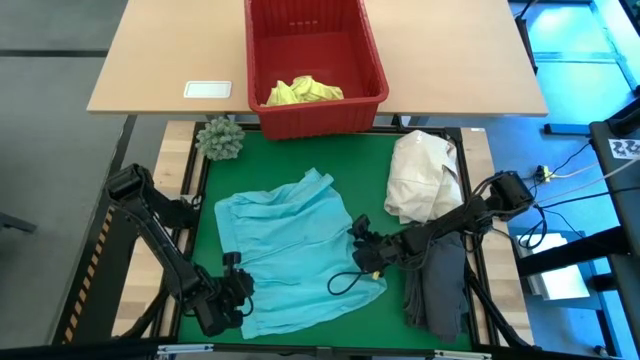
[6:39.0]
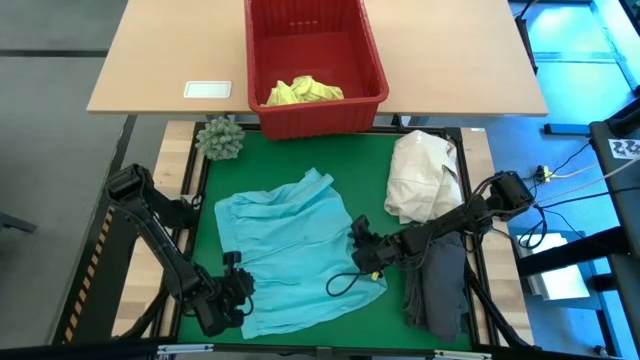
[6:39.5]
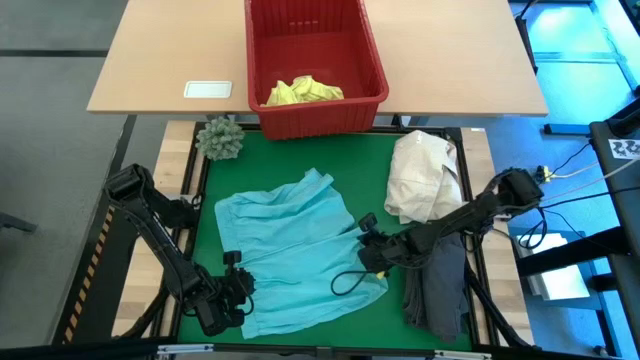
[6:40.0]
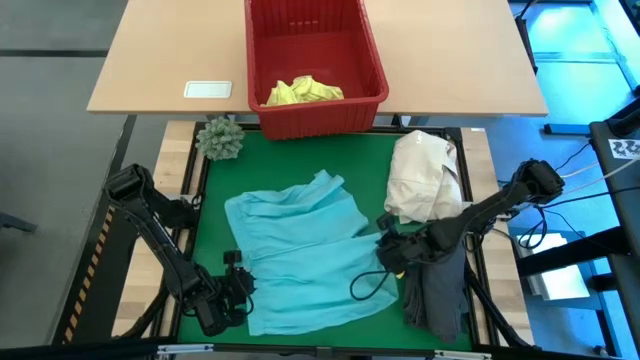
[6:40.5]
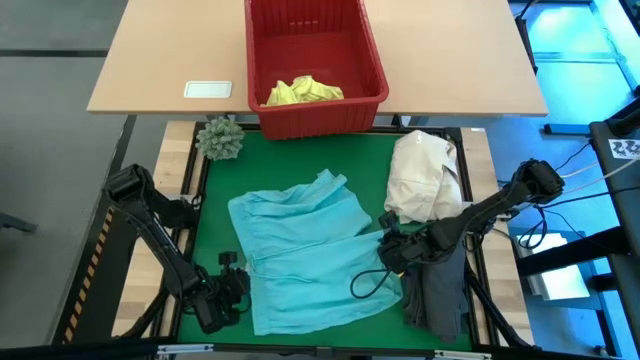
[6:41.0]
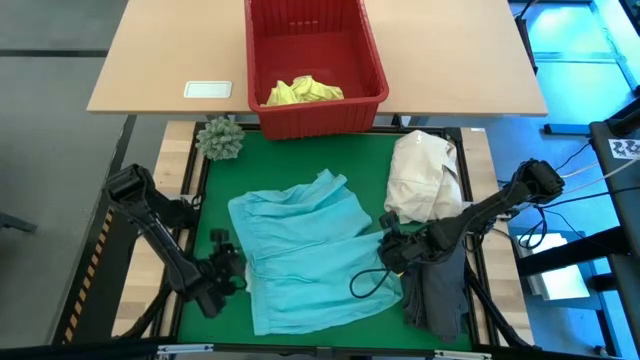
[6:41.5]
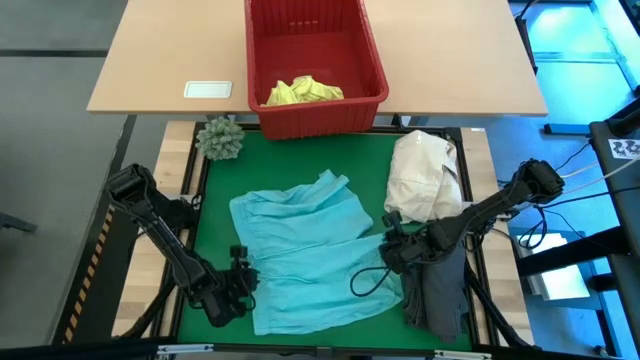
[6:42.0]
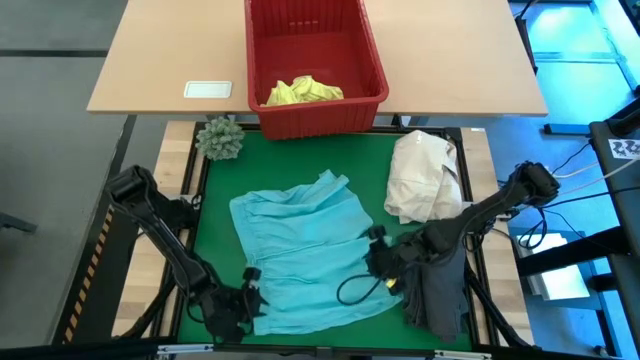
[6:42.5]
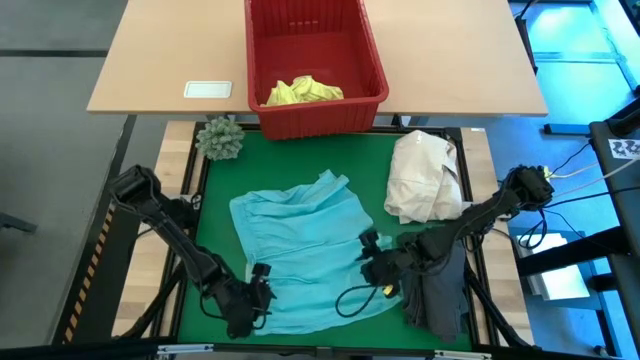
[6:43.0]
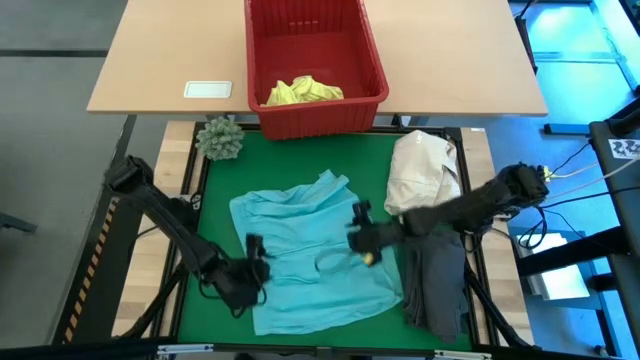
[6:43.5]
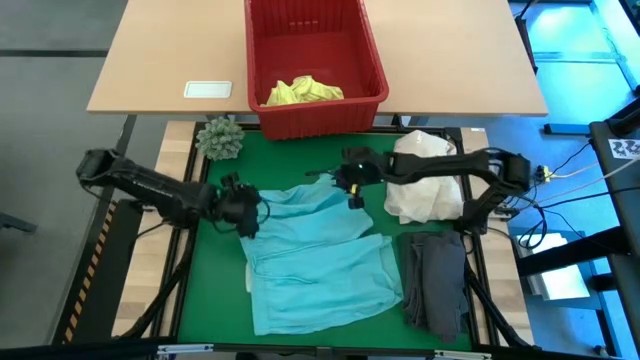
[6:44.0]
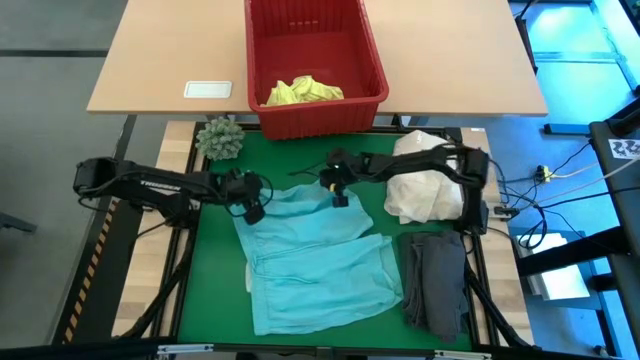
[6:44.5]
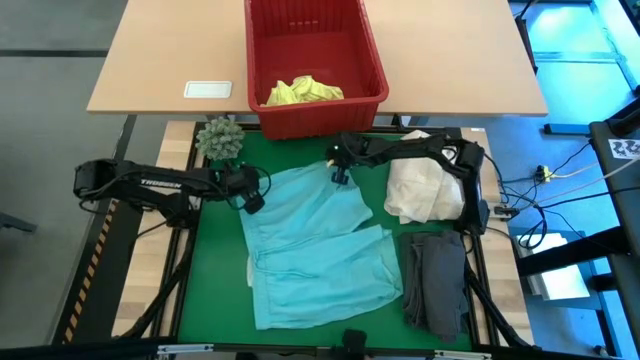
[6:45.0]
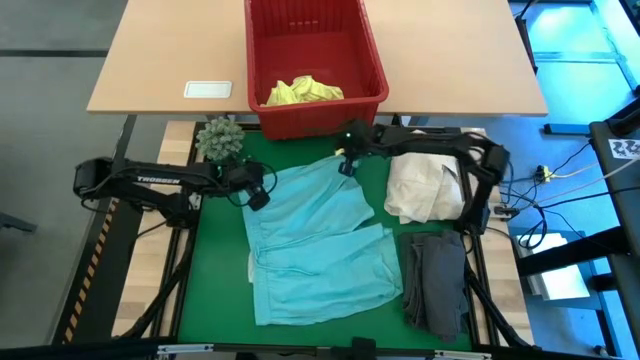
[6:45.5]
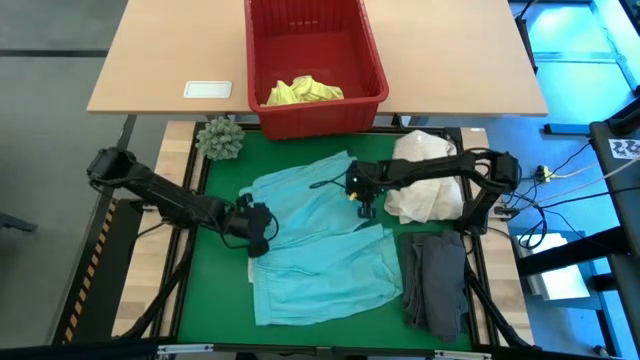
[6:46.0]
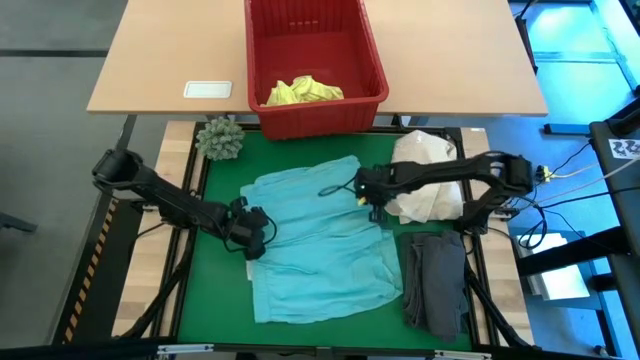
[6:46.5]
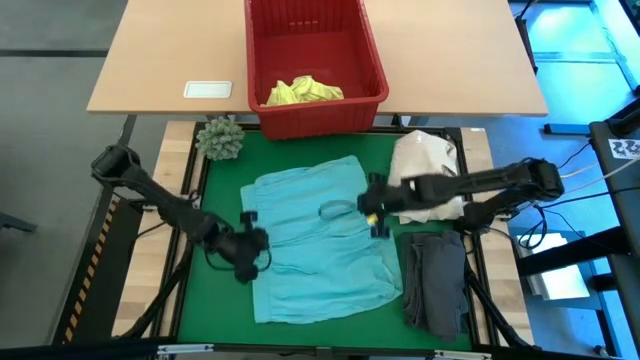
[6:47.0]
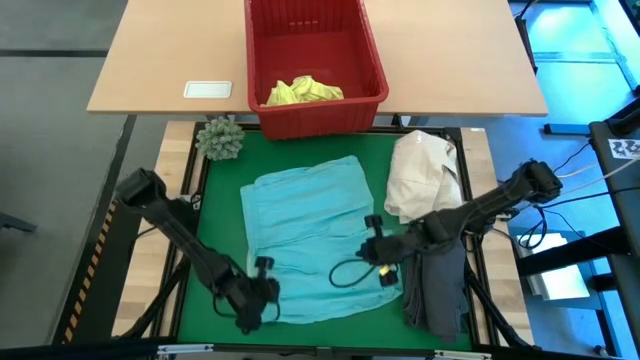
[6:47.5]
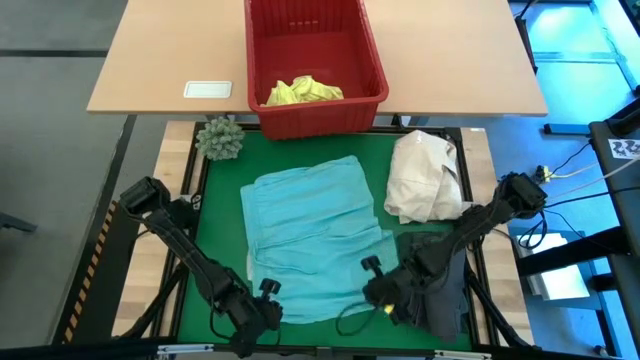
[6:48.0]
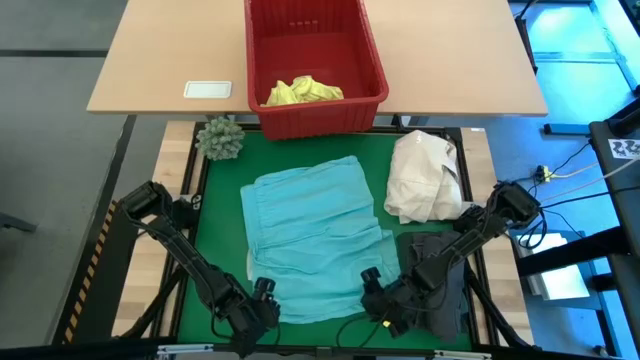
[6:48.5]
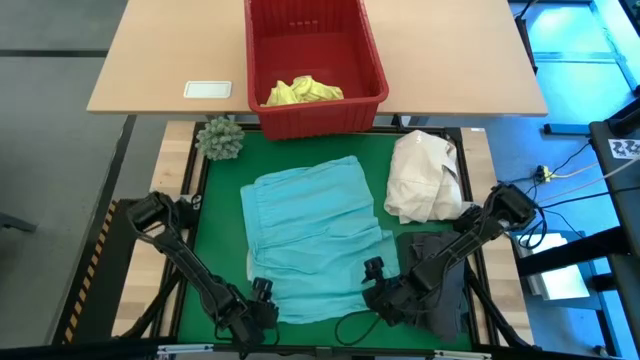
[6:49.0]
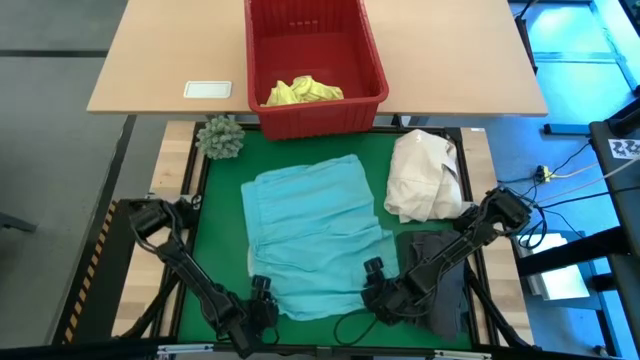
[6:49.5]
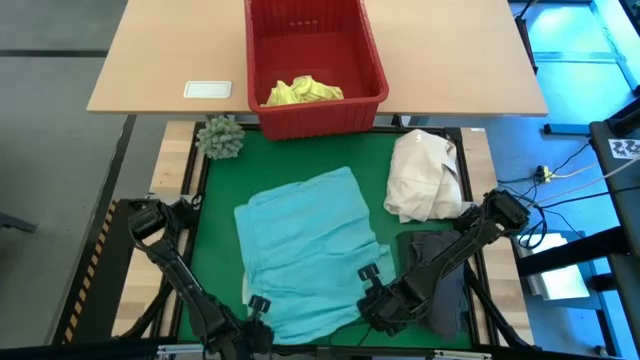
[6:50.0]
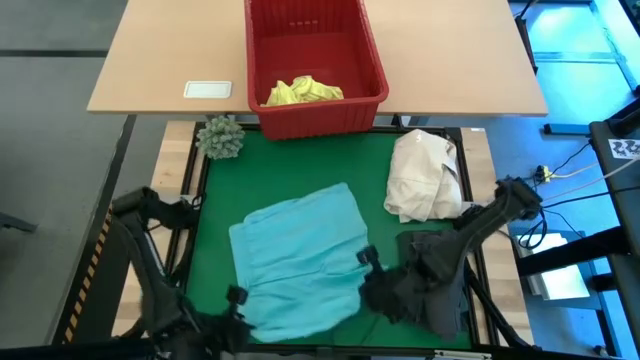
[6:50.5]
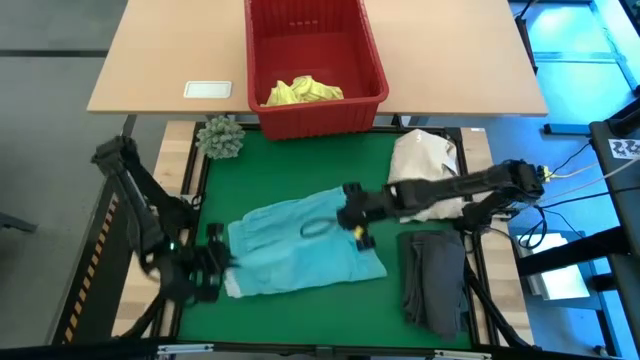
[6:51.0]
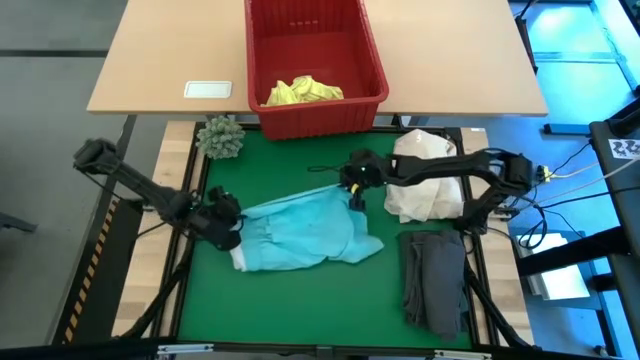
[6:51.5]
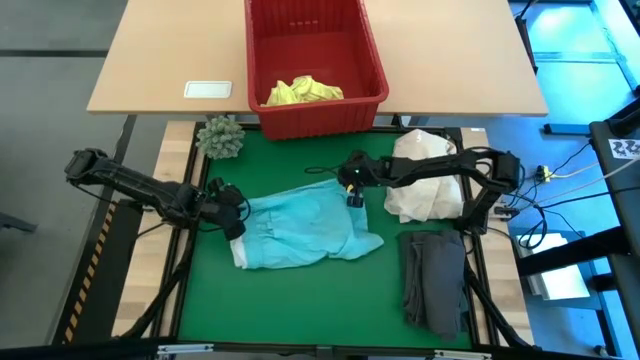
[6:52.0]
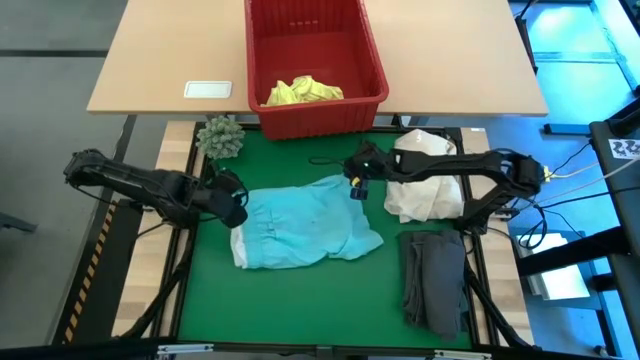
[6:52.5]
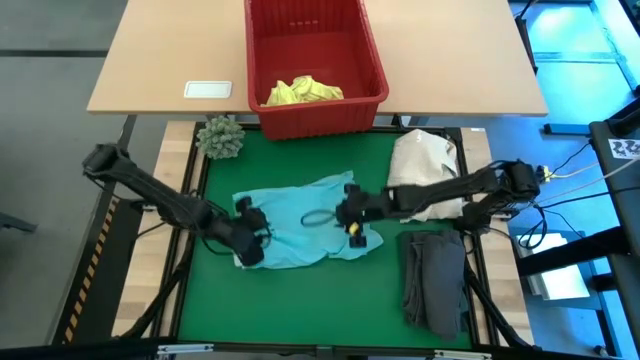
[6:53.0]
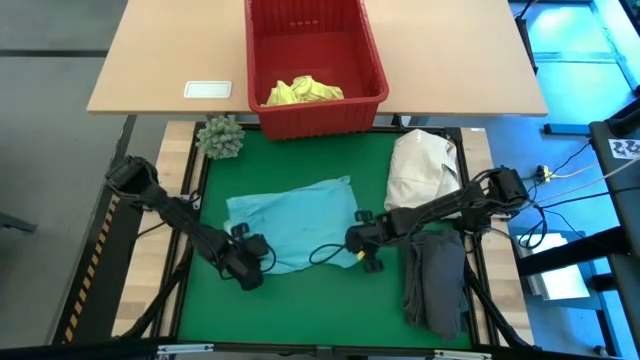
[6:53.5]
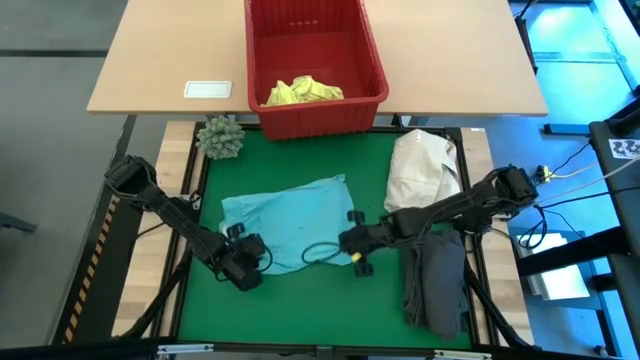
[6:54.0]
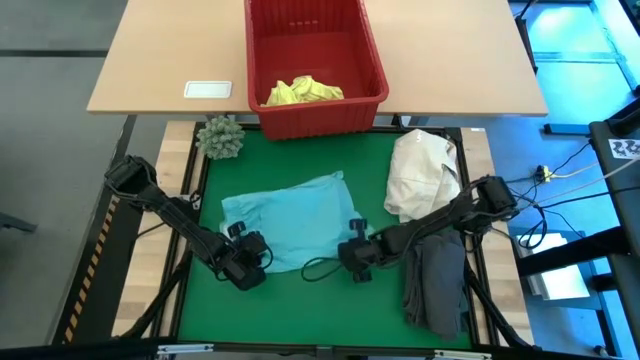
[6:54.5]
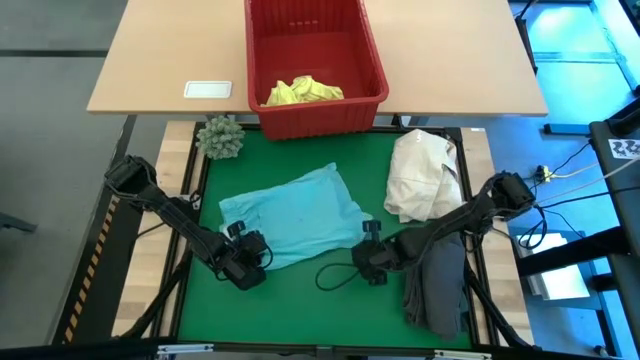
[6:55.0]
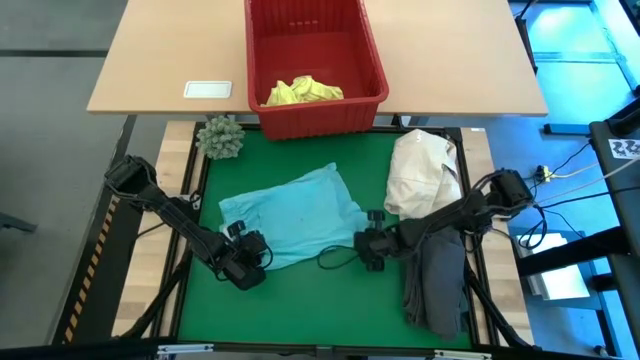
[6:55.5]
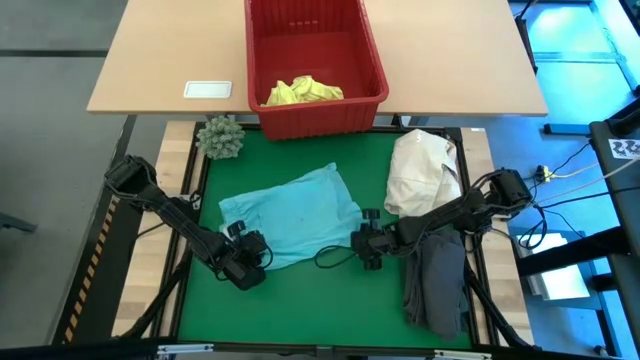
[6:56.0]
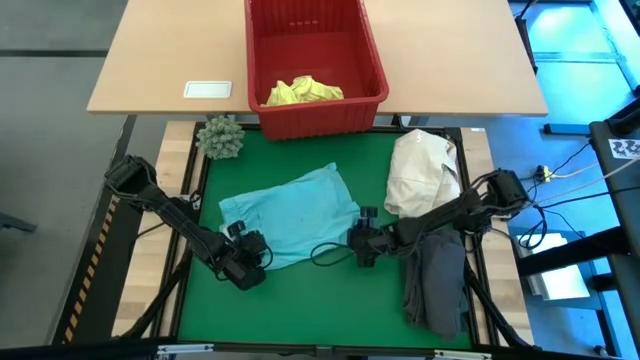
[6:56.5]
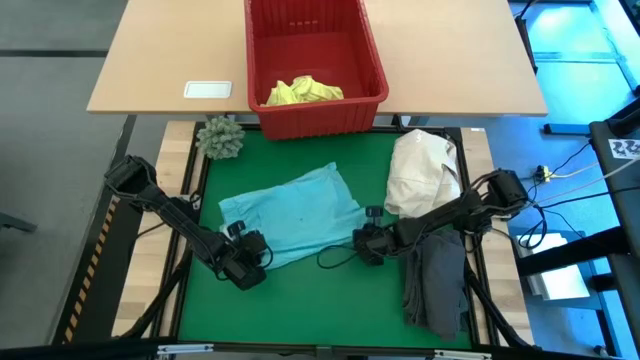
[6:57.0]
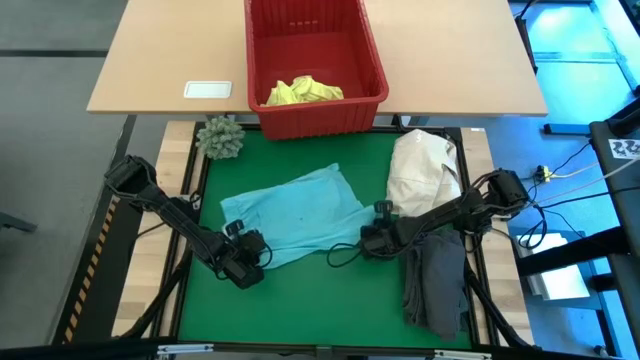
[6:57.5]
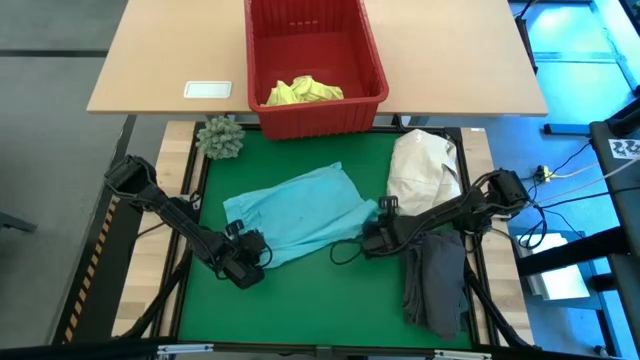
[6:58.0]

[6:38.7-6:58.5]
Task: Fold Laundry from Bin
Fold the blue short

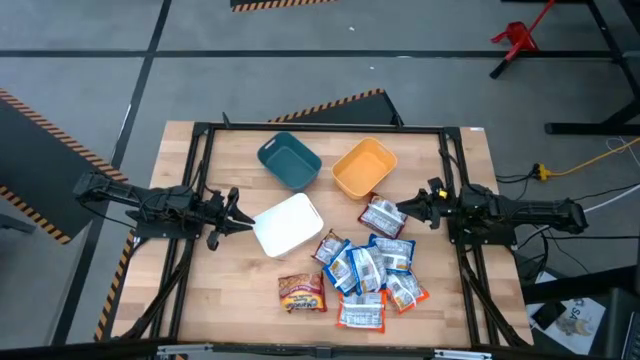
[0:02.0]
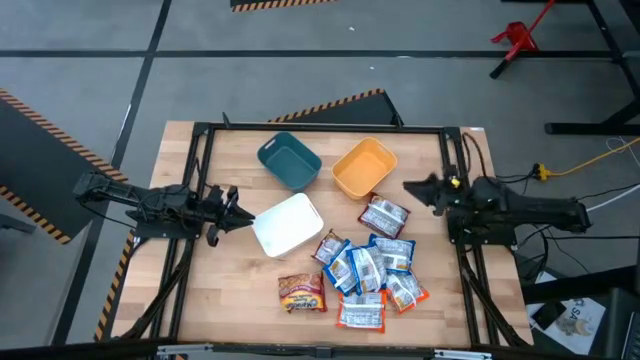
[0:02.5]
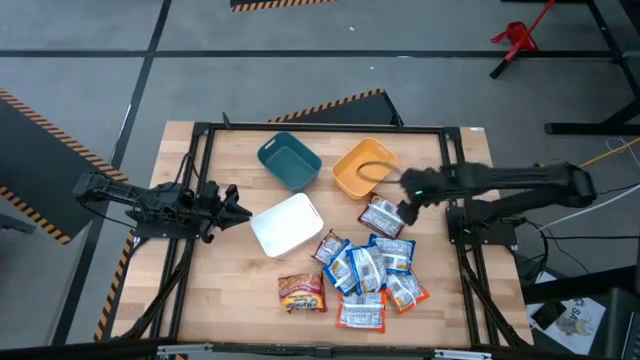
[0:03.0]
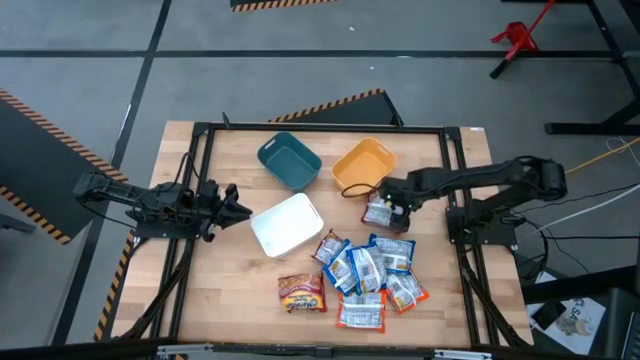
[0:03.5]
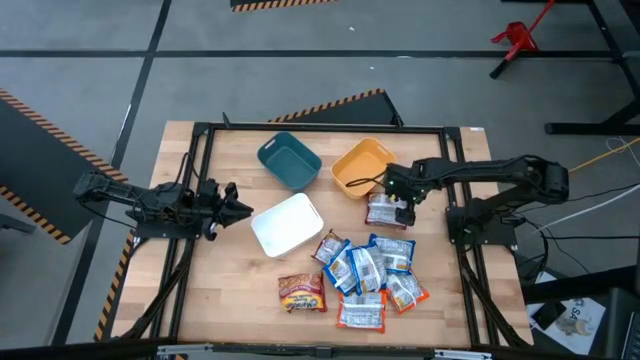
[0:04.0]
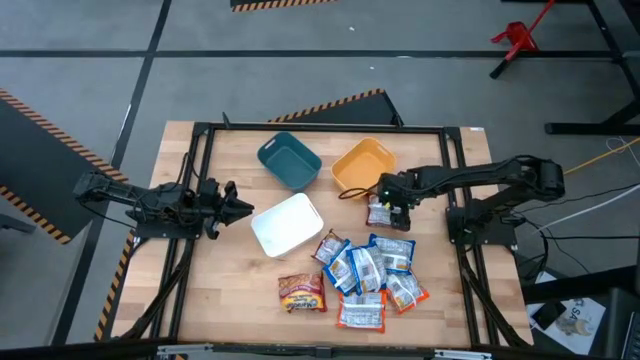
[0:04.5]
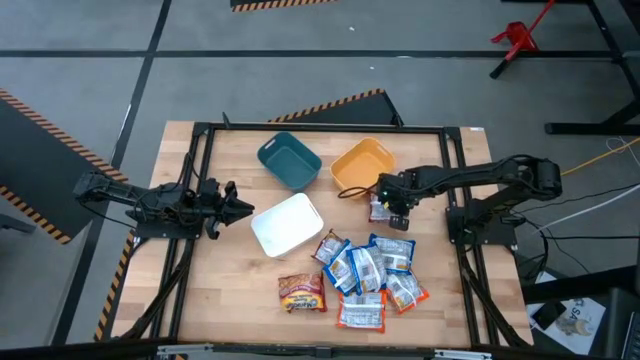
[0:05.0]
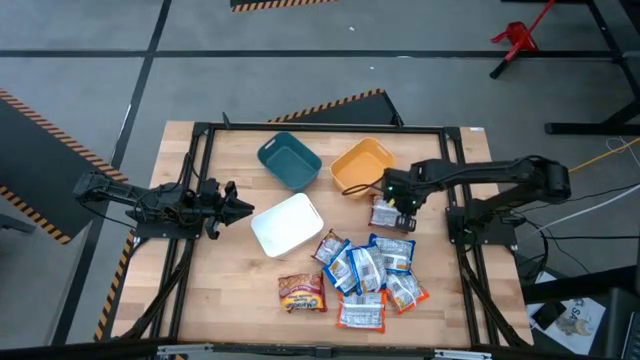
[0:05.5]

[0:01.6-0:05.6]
Task: Sort Maruchan noodles
Put the top red noodle pack into the blue bin
